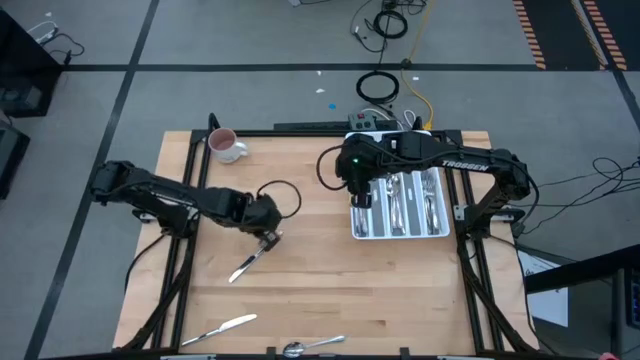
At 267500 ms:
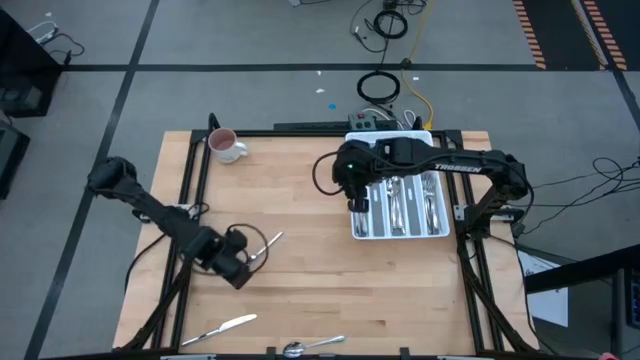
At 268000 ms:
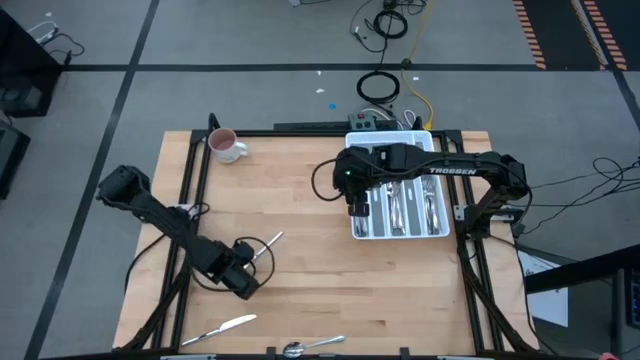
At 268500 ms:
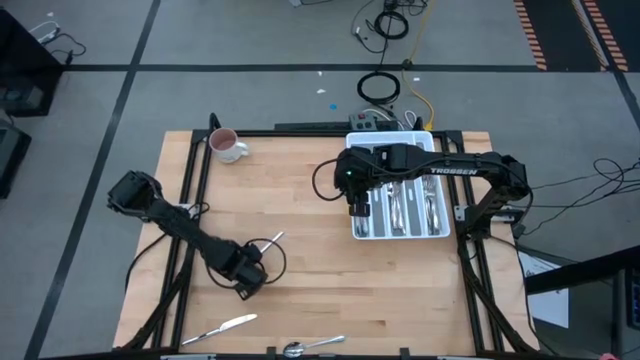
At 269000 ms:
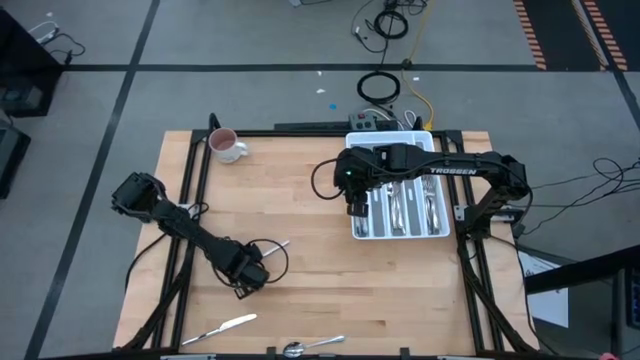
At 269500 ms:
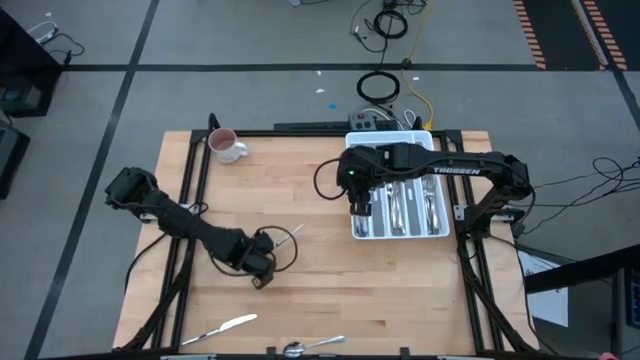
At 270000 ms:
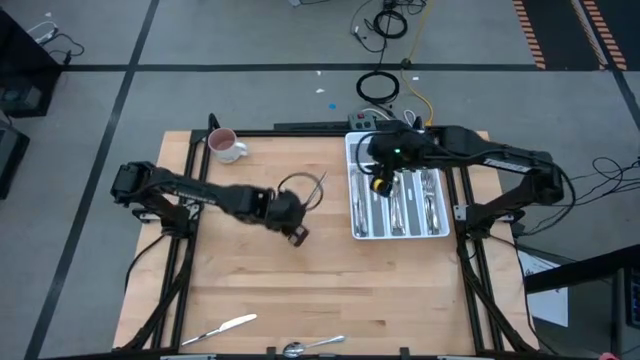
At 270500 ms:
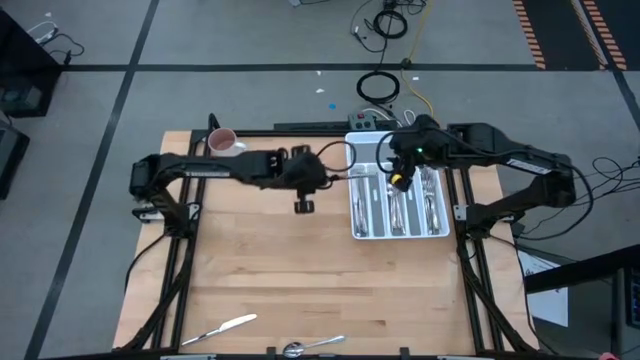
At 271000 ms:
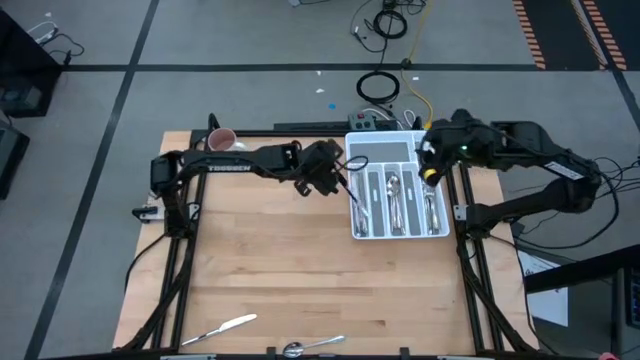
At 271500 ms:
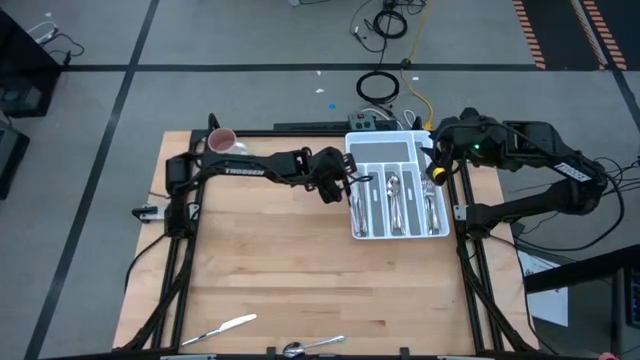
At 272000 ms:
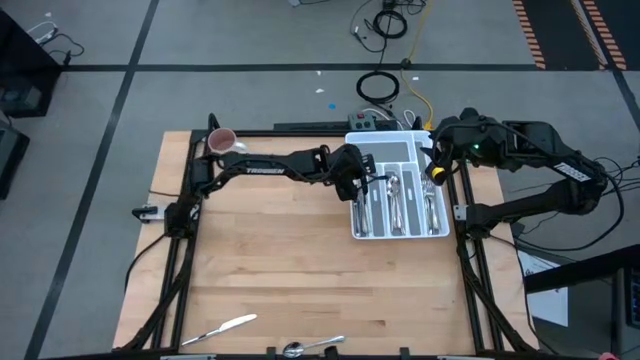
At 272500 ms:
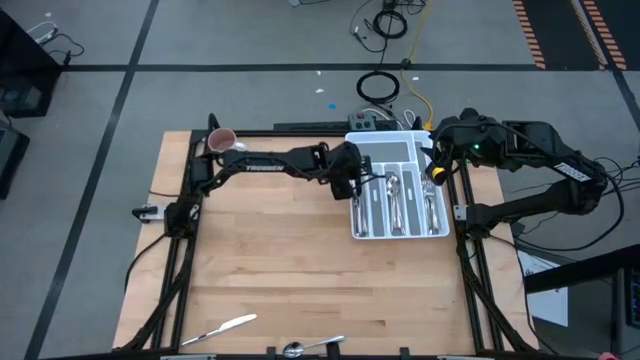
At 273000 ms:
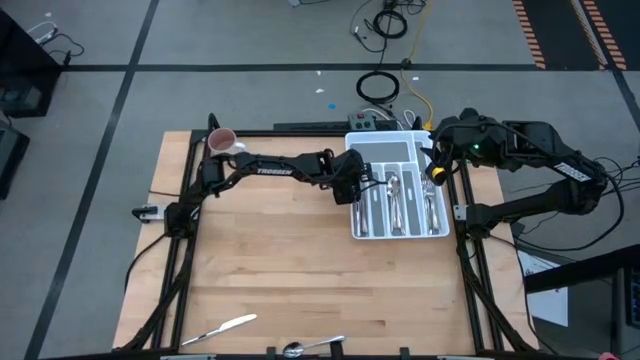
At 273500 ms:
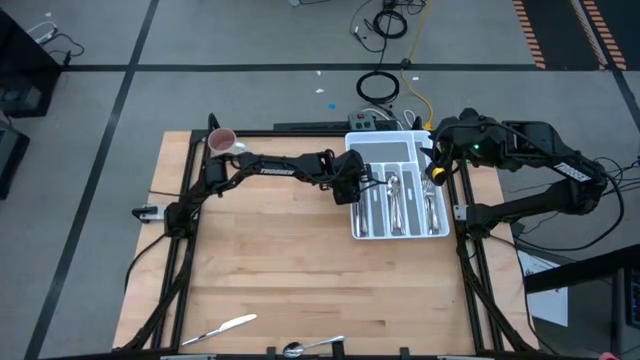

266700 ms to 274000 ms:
Task: Sort silverware
Put the top knife in the left section of the silverware tray

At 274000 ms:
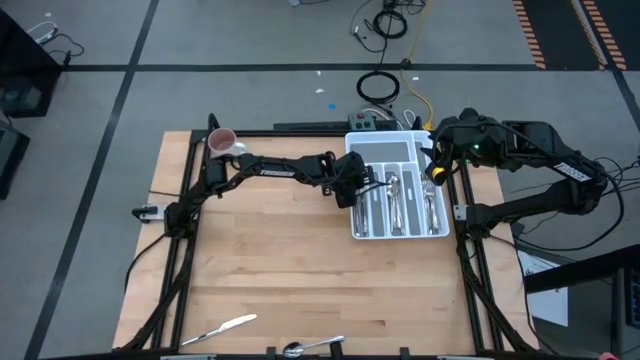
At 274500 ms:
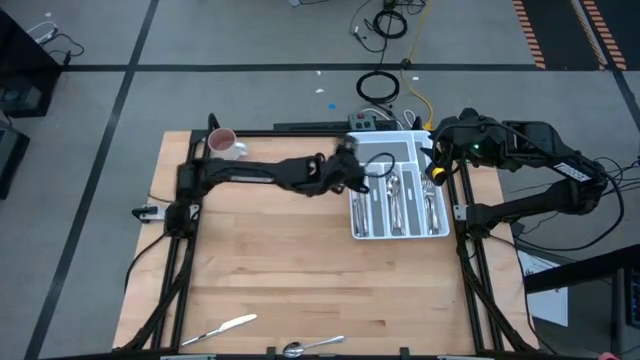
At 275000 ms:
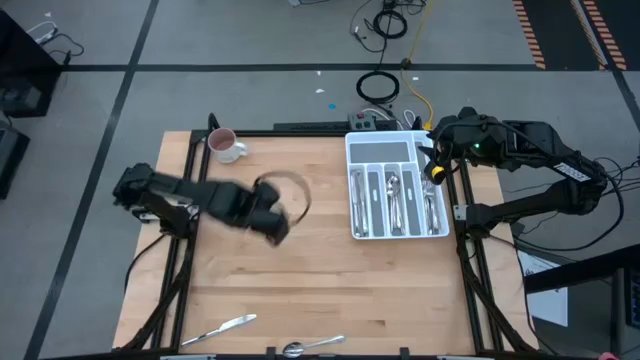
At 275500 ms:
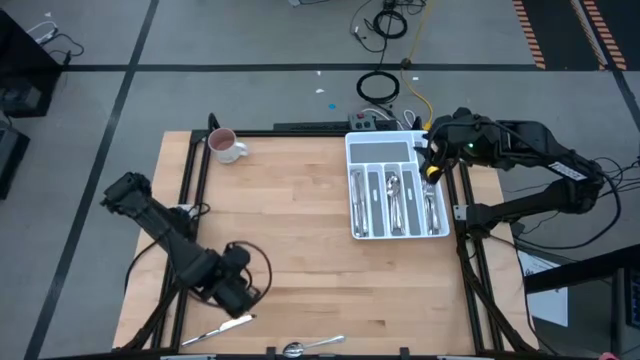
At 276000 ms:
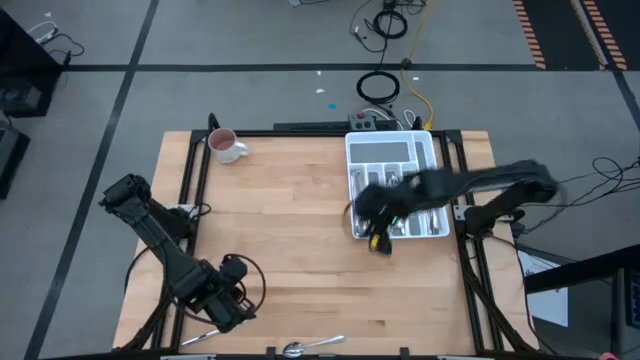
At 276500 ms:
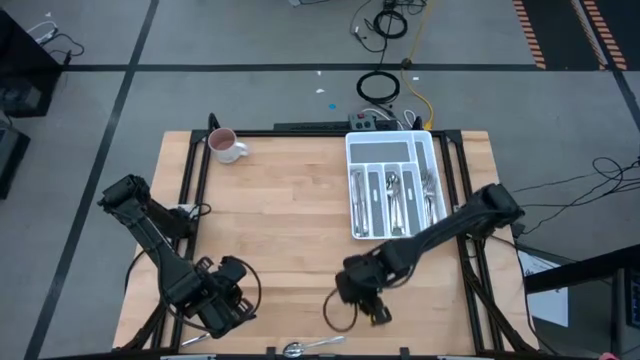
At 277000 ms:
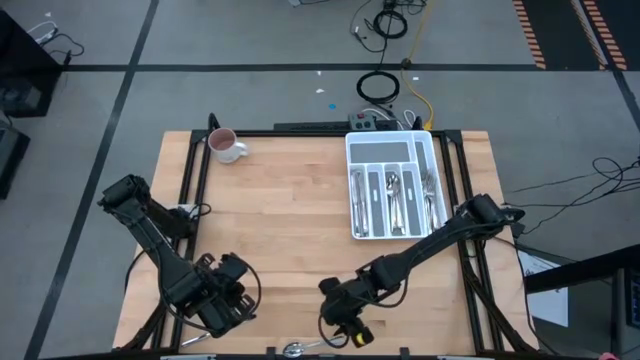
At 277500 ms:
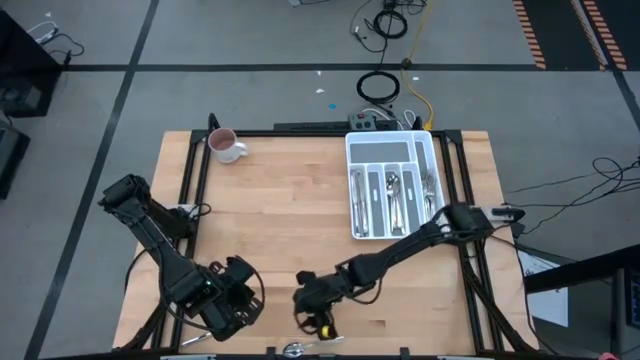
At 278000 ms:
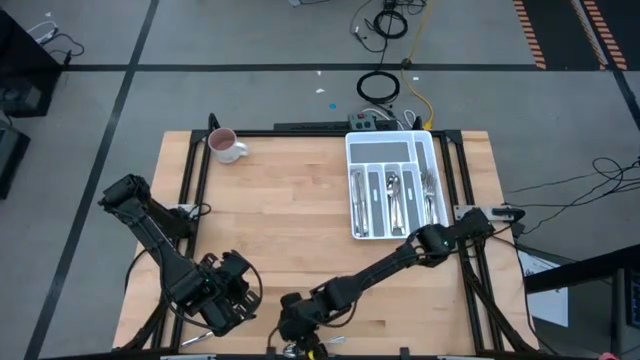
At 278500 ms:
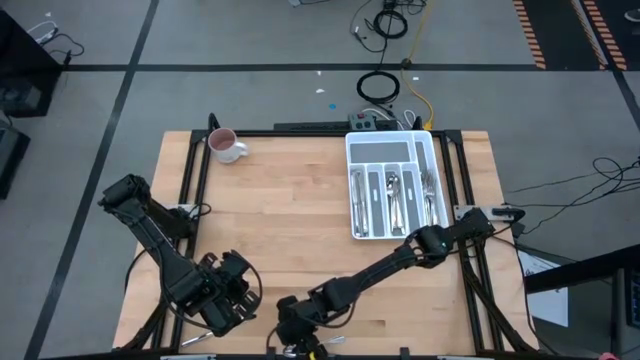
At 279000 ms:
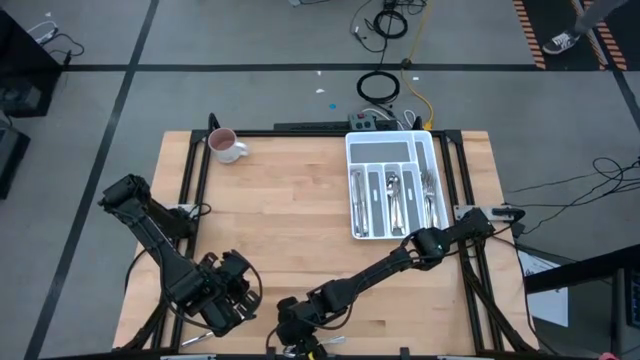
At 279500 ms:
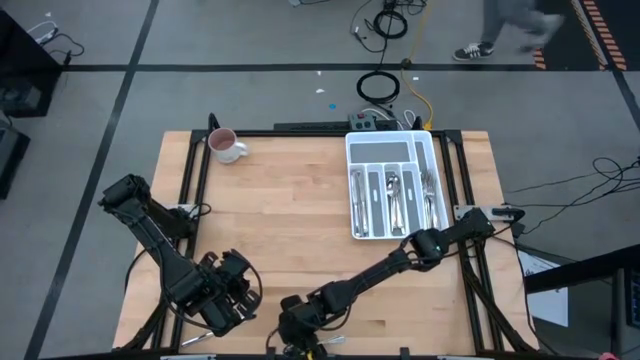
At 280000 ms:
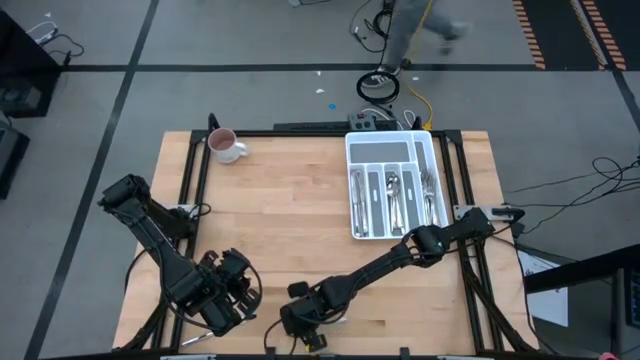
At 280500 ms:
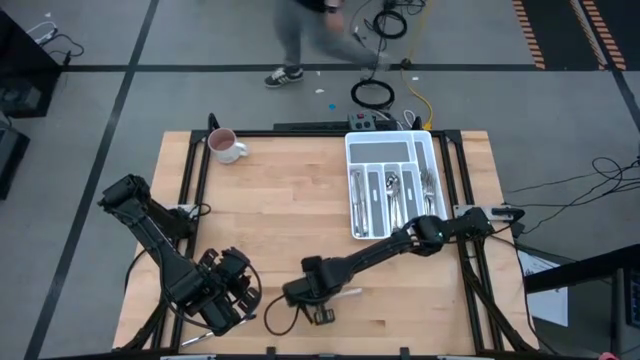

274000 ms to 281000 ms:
Put the spoon in the middle section of the silverware tray

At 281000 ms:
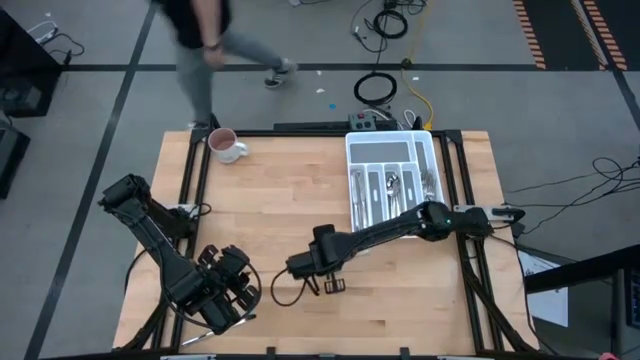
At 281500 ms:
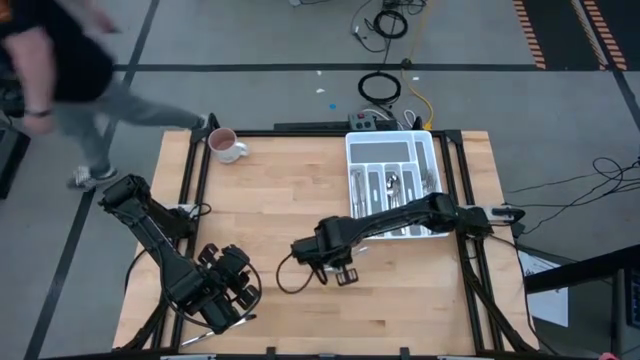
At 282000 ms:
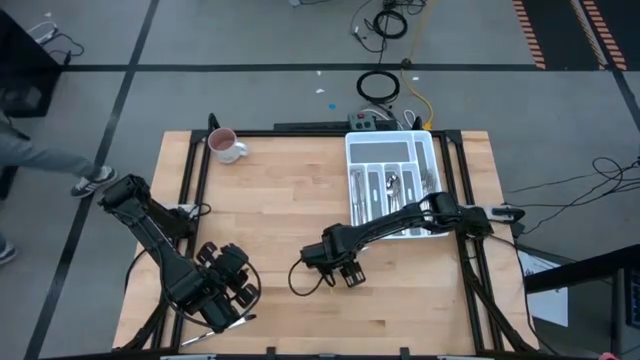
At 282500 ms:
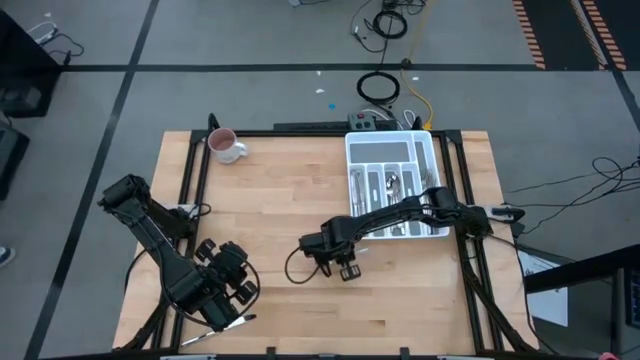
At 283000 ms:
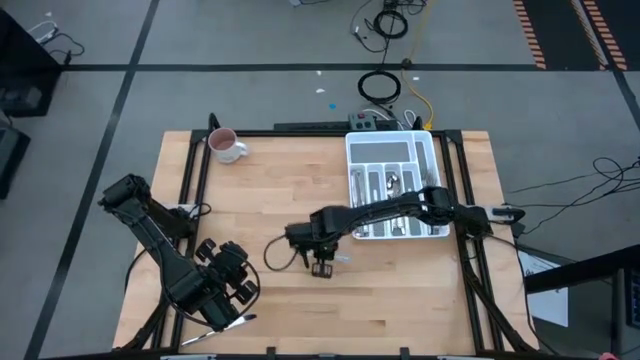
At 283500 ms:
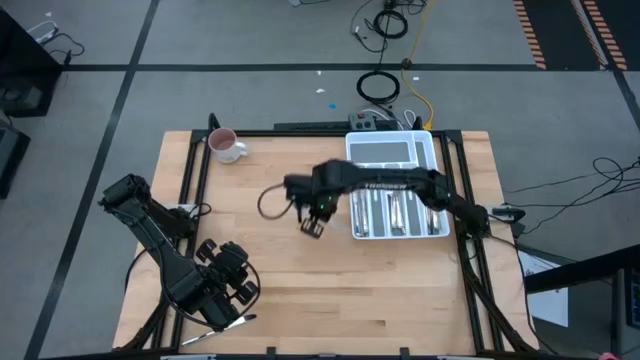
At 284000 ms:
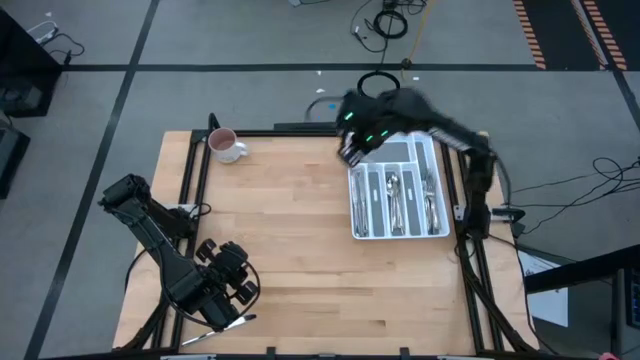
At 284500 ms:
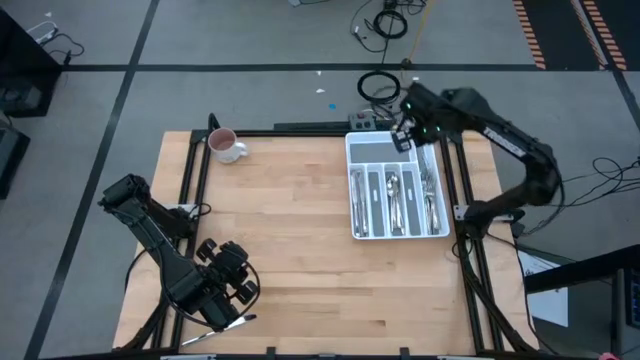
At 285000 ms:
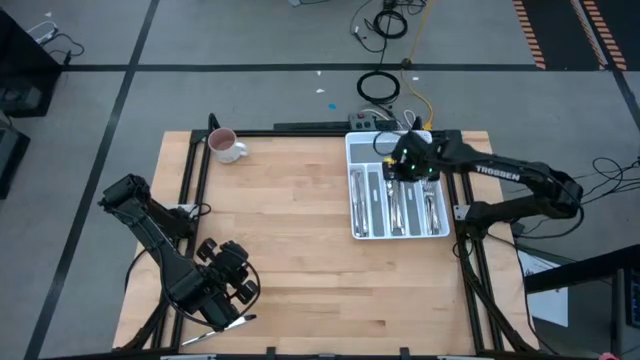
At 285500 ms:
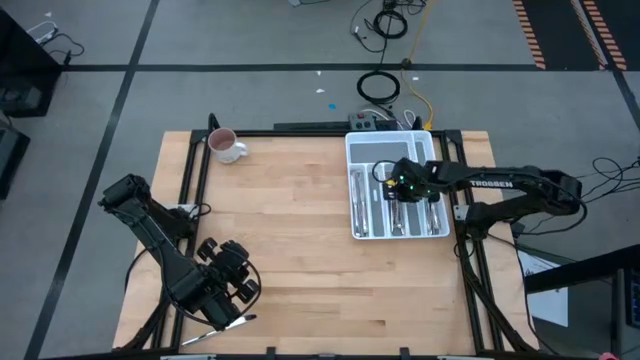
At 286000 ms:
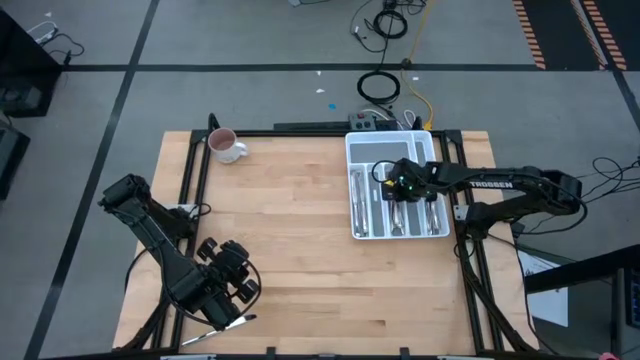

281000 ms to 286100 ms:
Put the spoon in the middle section of the silverware tray
